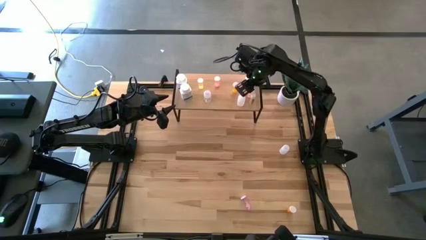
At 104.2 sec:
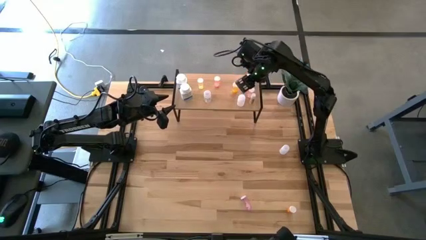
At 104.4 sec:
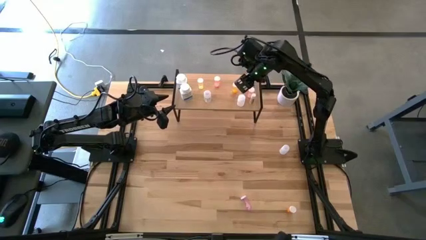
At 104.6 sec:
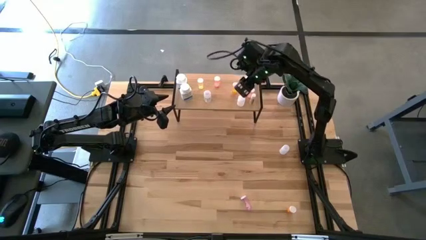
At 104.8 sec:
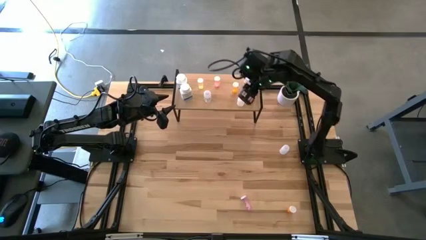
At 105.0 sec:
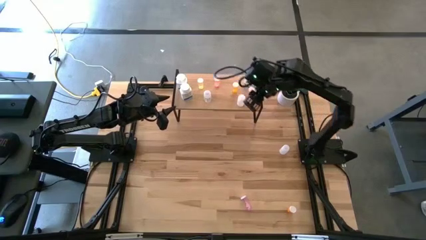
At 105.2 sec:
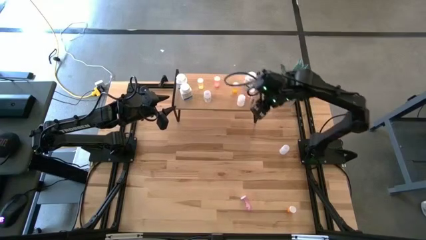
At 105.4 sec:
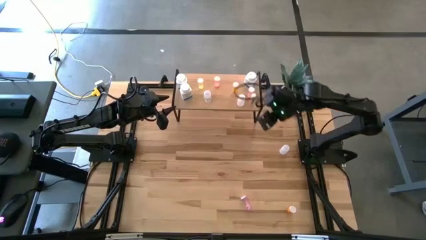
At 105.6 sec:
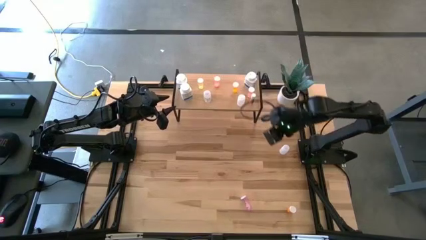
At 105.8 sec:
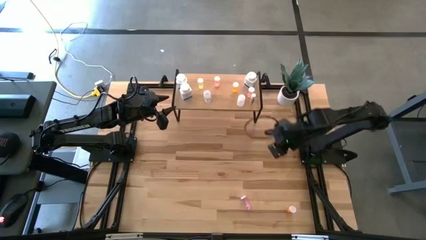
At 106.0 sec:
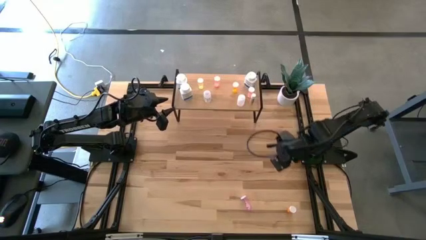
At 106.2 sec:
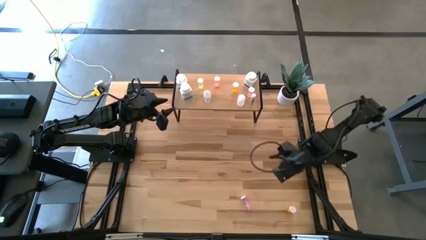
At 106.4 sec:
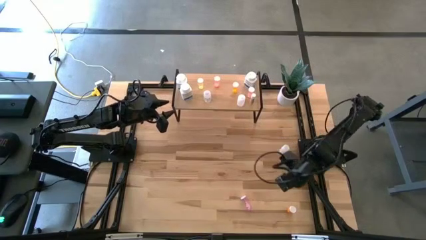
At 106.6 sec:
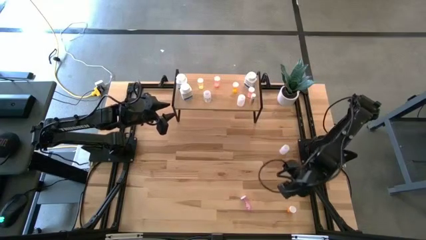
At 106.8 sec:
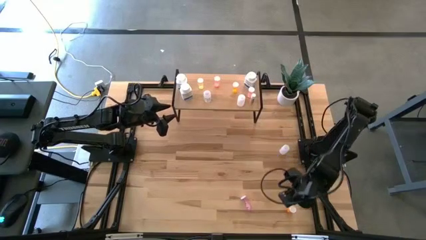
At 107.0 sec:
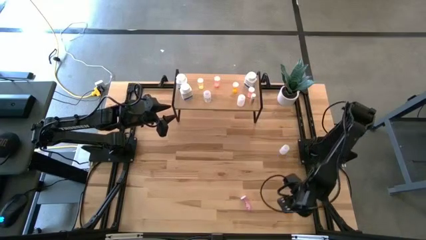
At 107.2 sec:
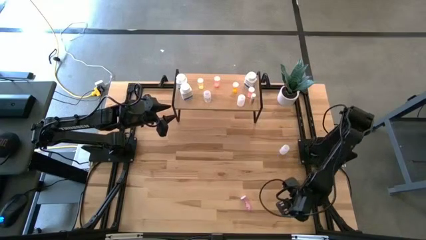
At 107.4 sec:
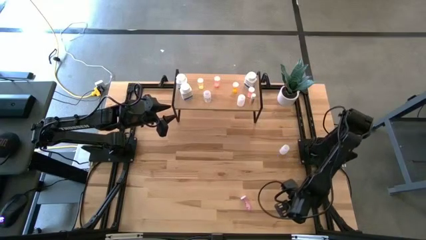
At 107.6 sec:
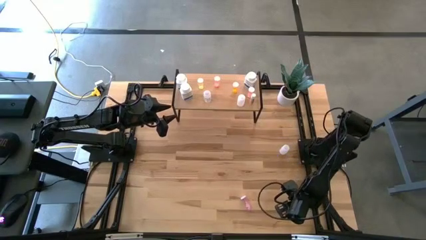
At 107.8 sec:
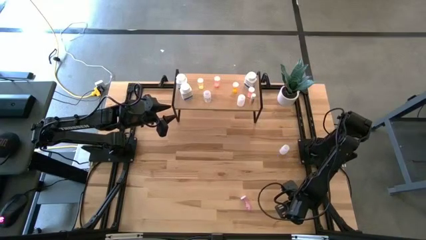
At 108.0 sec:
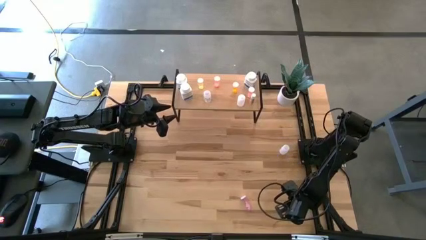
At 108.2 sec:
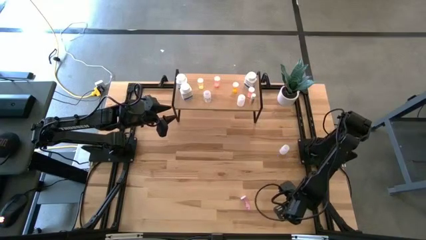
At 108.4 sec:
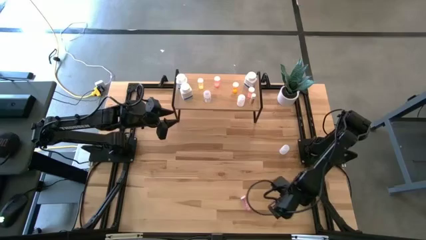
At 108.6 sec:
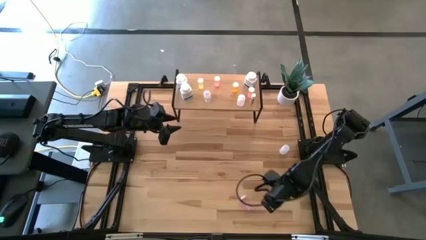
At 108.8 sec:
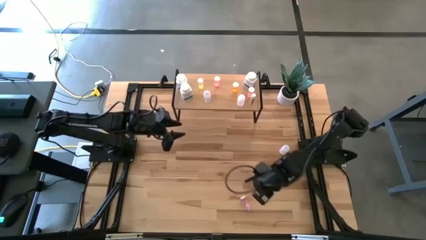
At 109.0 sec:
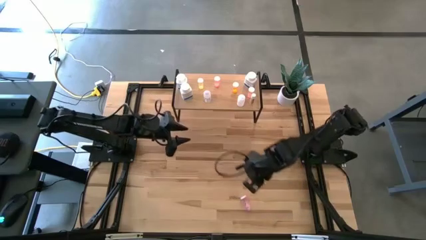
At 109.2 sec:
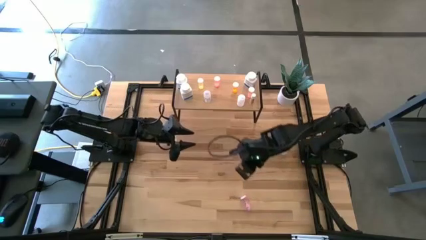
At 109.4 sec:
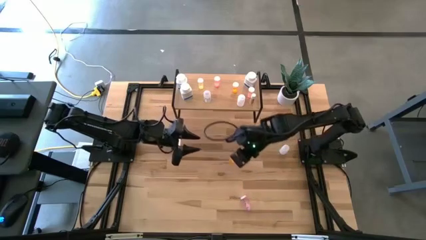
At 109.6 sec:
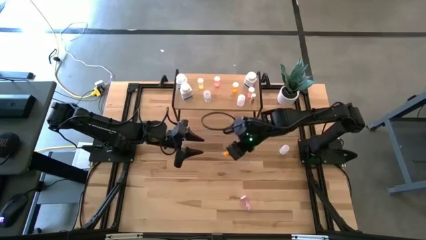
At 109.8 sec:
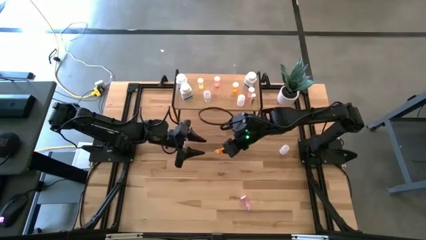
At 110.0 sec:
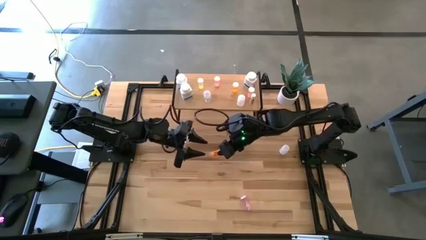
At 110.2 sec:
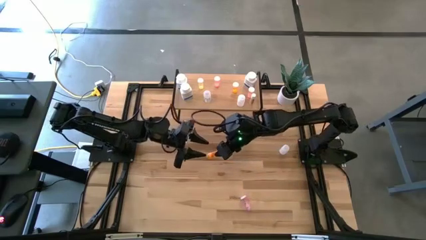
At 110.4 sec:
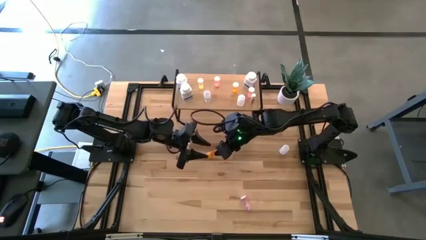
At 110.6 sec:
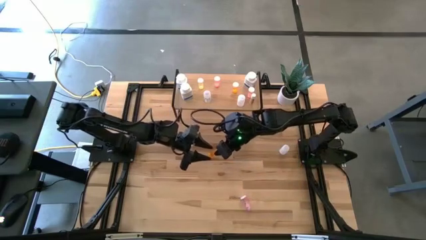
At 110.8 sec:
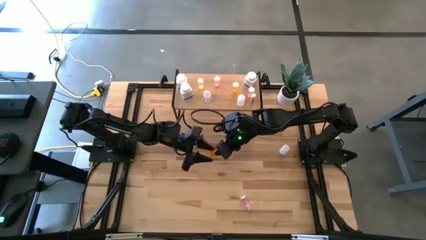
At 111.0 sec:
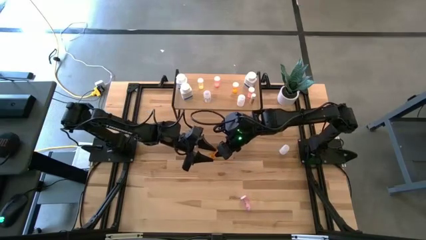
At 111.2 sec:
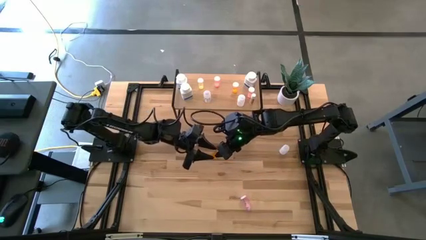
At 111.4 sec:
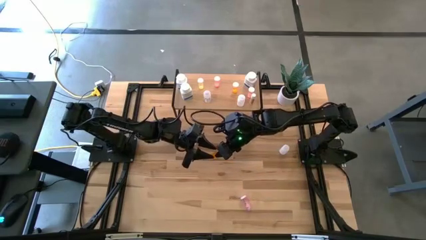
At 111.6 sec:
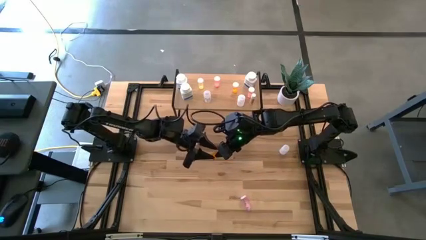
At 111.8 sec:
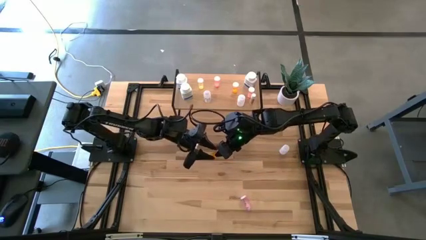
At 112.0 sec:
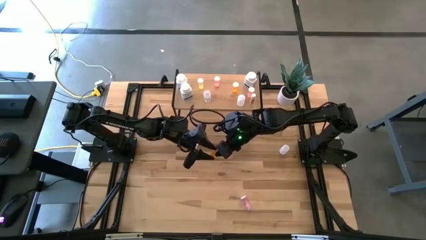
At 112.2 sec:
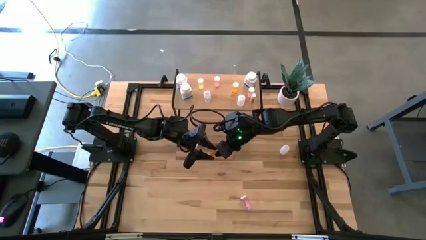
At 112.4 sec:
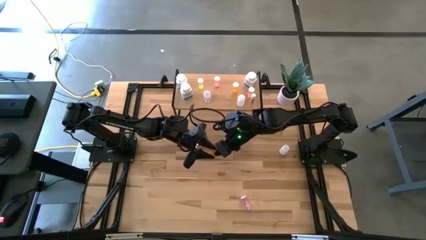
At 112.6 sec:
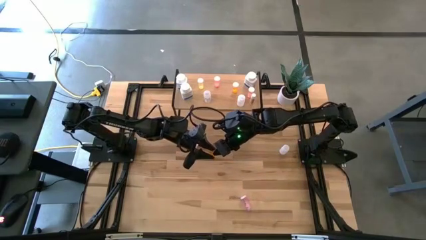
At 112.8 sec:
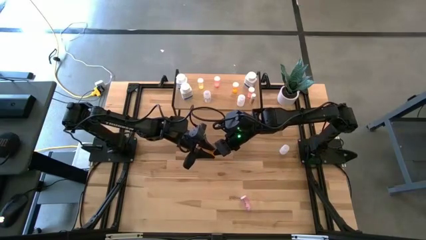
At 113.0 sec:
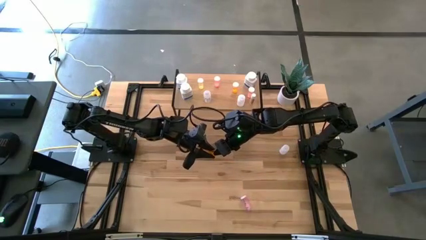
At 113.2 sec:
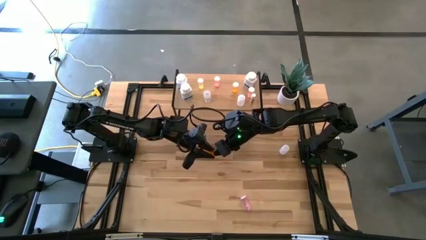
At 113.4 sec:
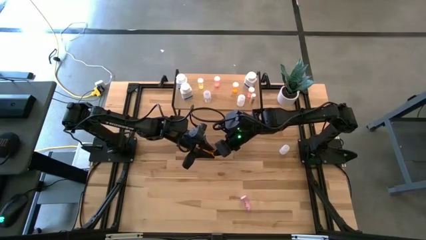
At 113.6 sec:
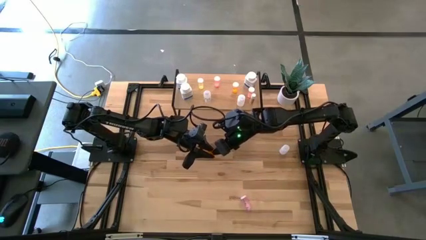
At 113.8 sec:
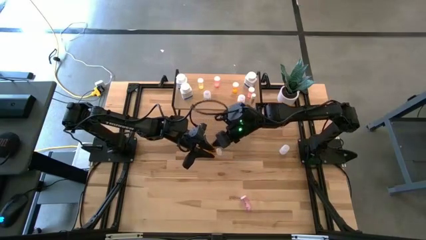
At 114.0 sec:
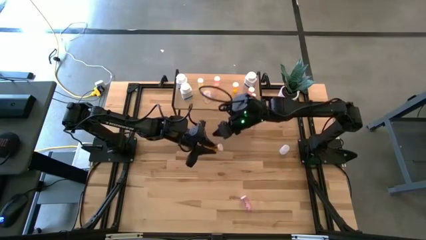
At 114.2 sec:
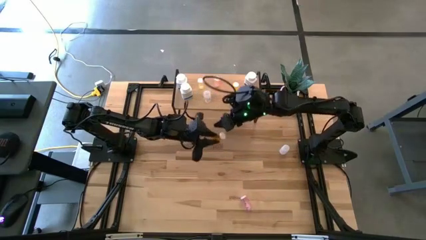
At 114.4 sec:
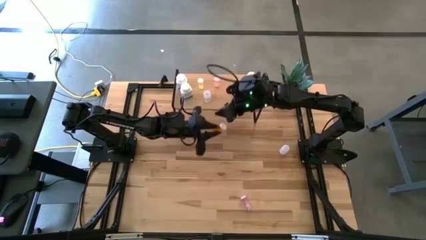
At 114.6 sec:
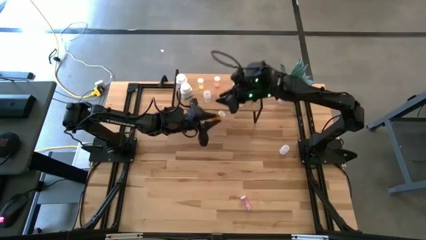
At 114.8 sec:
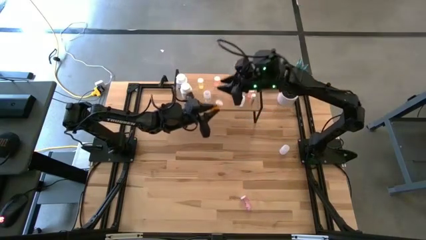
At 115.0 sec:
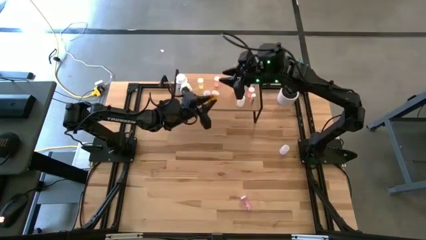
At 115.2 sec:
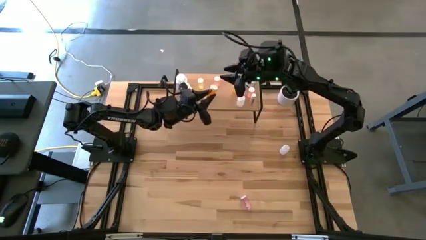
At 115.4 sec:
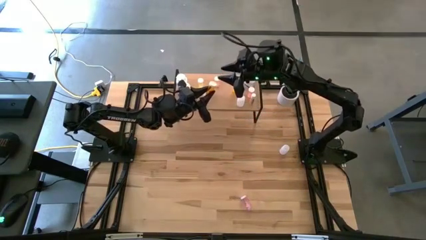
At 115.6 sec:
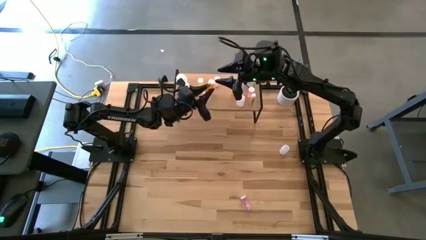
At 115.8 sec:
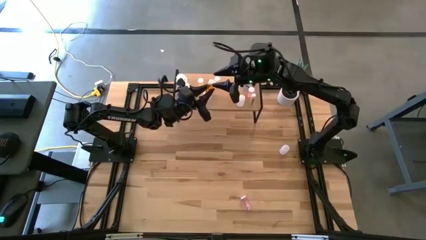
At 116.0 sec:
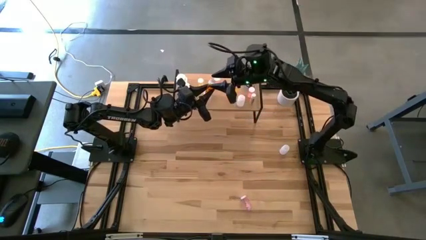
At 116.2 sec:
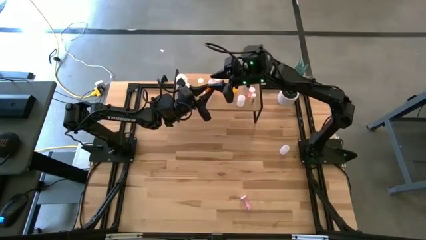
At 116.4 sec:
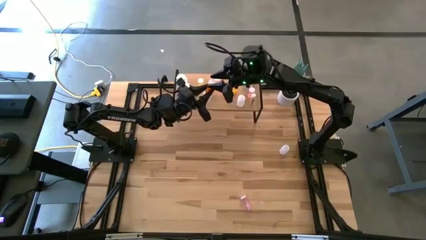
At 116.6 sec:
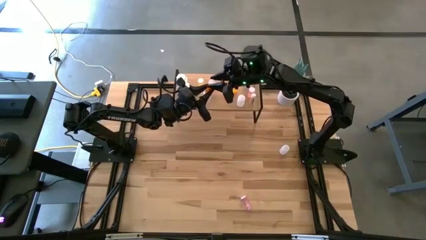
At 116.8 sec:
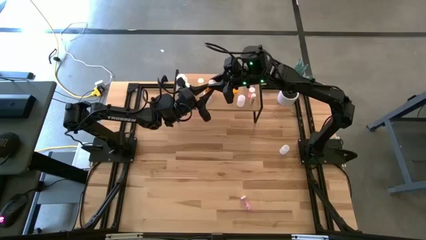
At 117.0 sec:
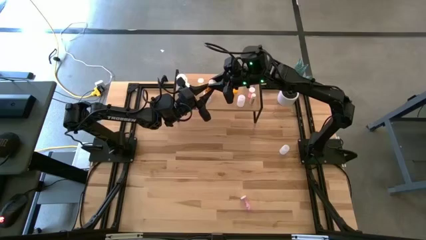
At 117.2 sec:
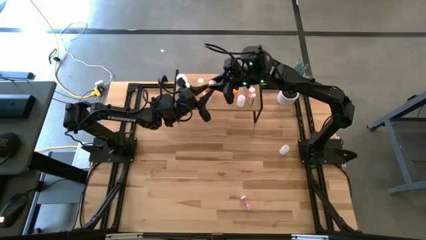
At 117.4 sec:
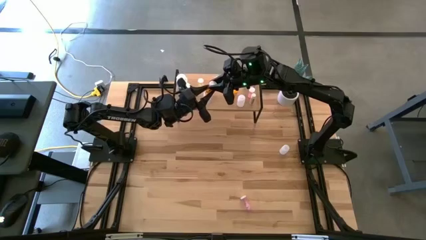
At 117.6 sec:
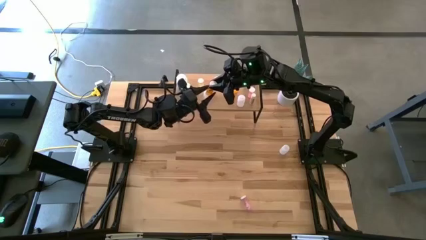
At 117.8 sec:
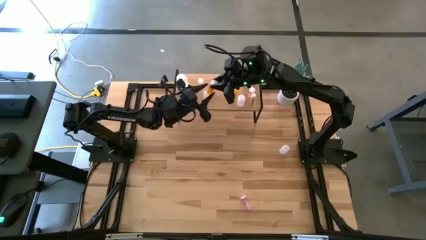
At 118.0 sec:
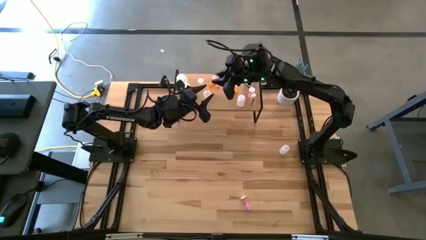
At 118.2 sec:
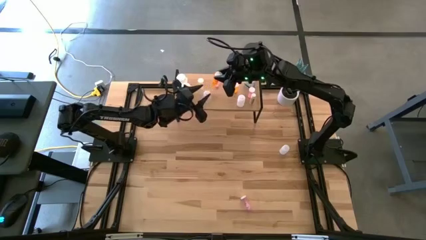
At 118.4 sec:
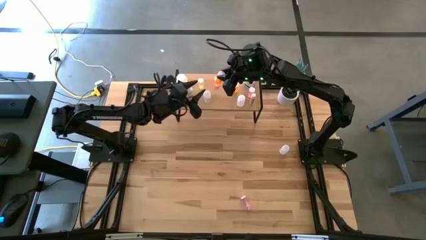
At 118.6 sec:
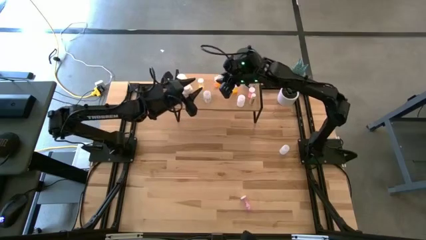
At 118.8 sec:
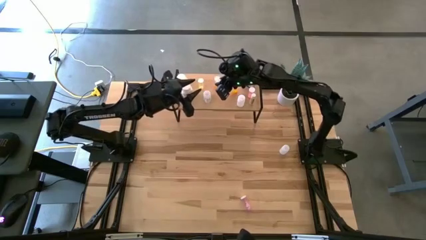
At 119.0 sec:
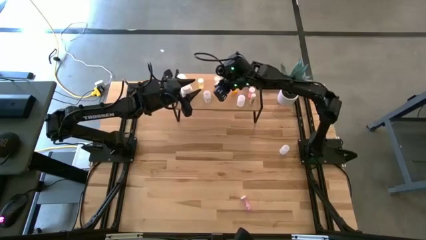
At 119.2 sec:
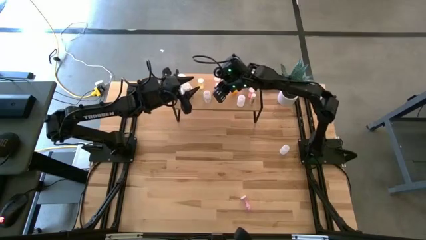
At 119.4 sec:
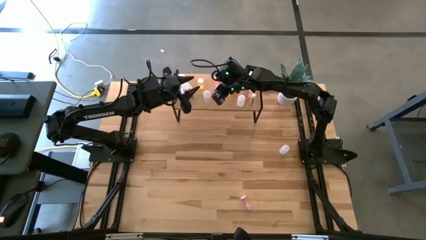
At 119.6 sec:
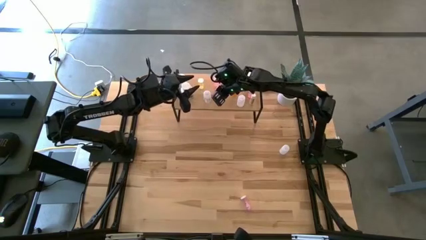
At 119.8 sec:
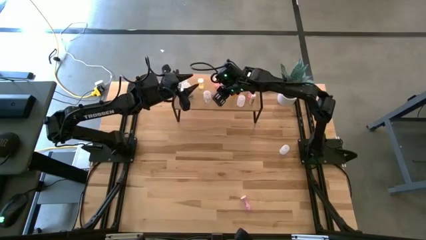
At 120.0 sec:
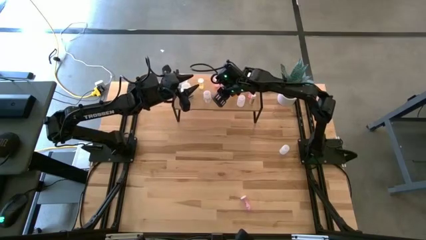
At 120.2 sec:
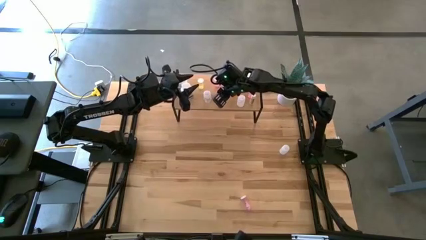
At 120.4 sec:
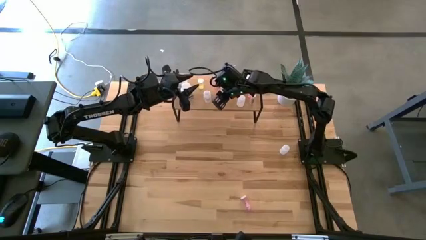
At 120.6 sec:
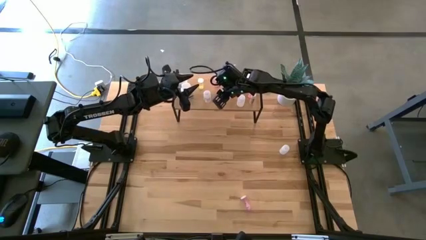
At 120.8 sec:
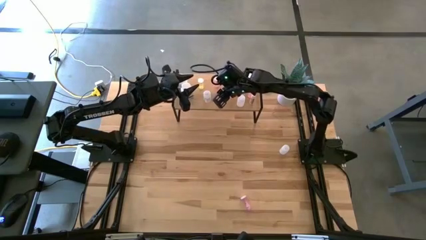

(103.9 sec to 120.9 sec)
Task: Pick and place medicine bottles onto shelf by color
Put the orange pill bottle on the shelf
